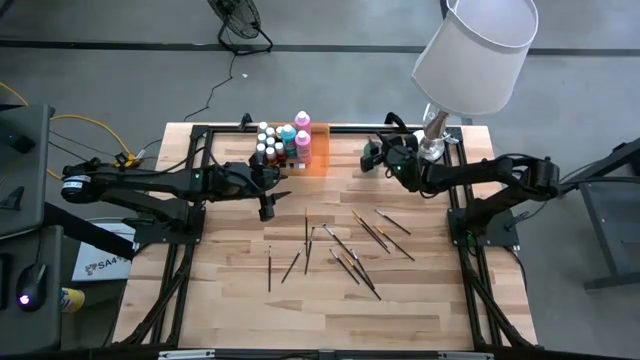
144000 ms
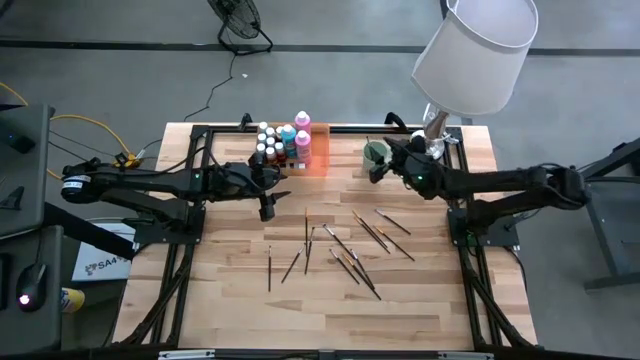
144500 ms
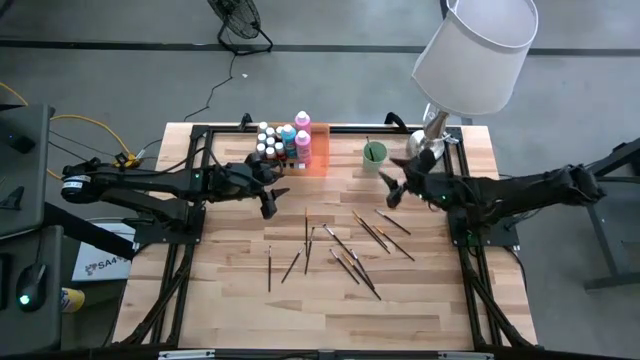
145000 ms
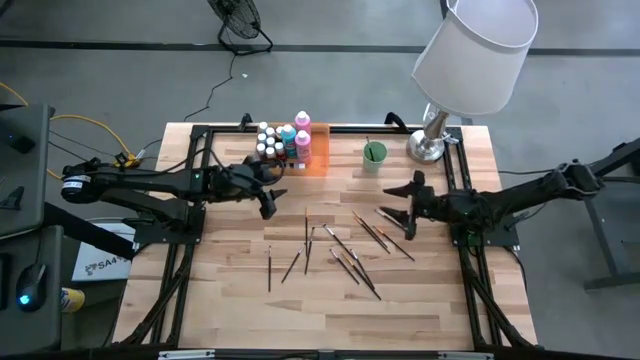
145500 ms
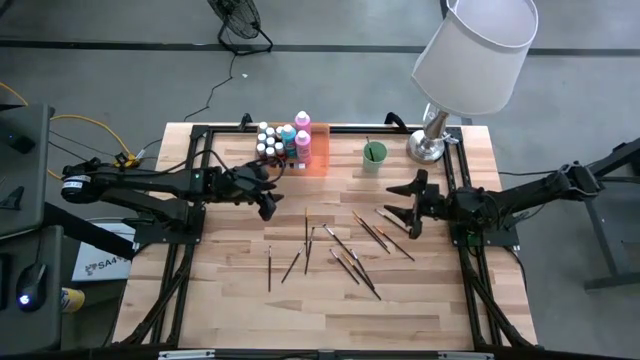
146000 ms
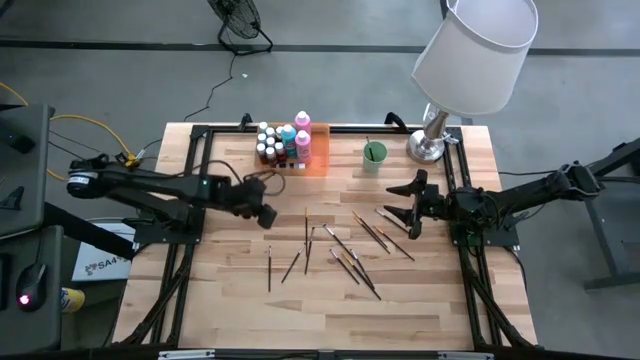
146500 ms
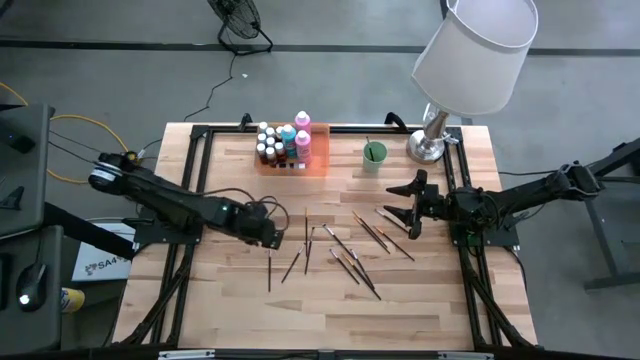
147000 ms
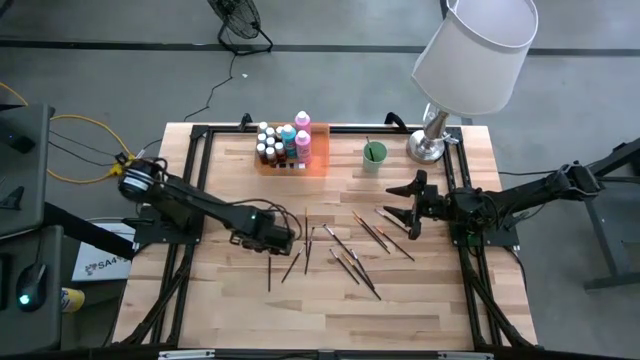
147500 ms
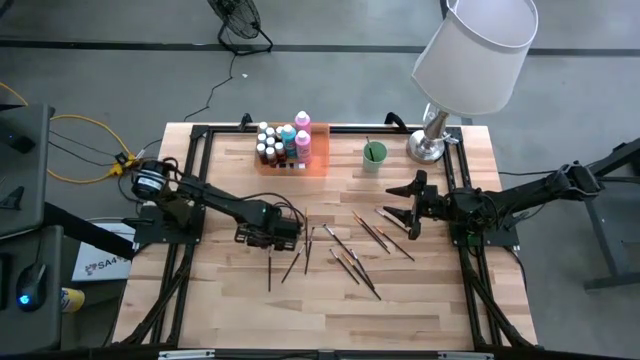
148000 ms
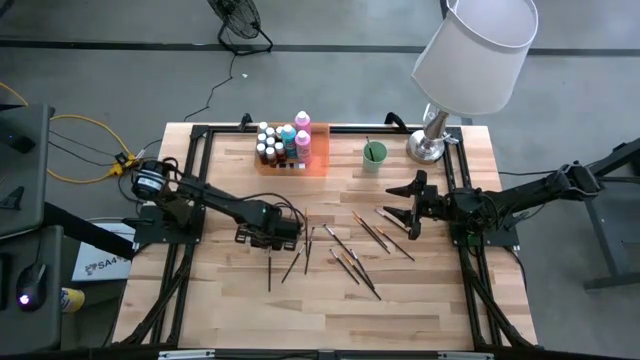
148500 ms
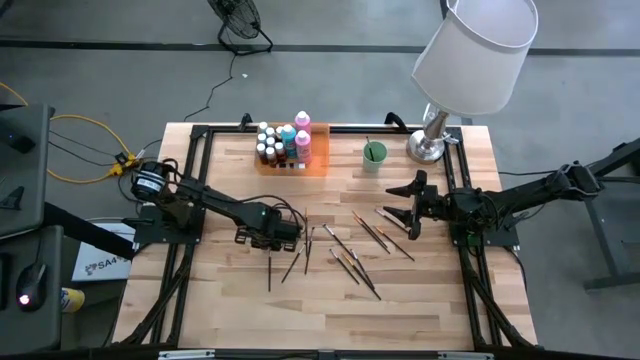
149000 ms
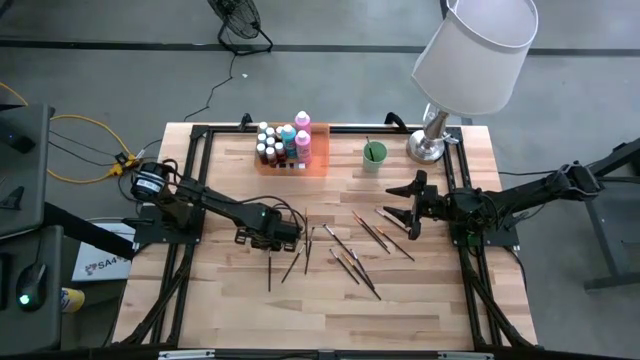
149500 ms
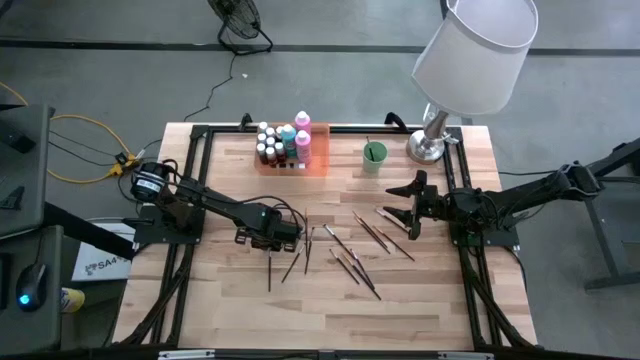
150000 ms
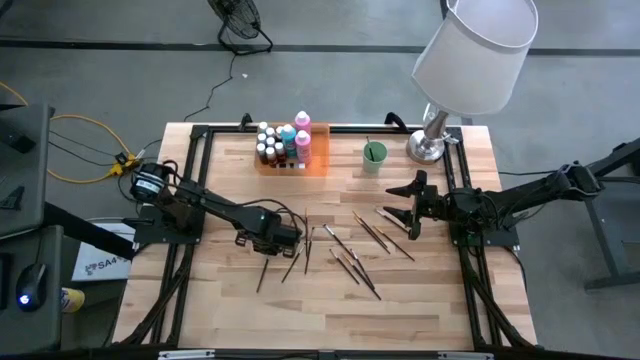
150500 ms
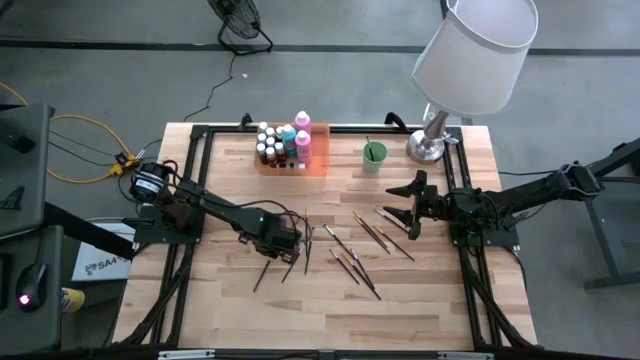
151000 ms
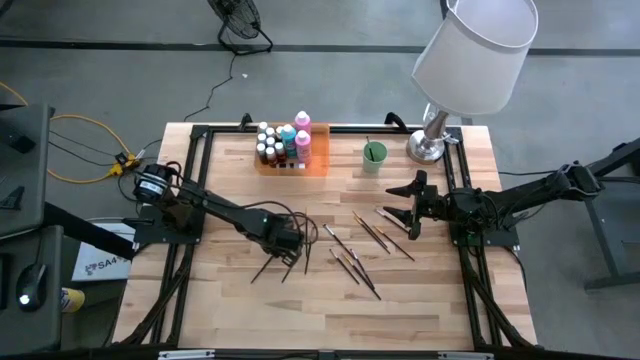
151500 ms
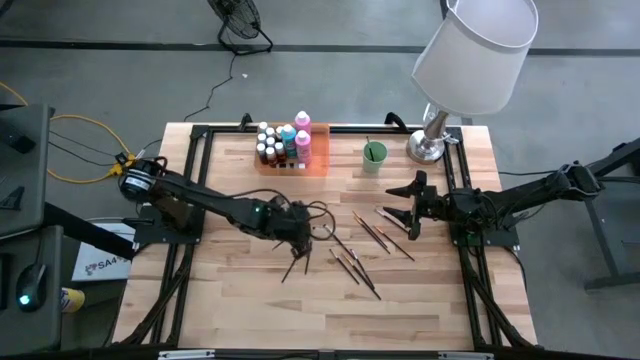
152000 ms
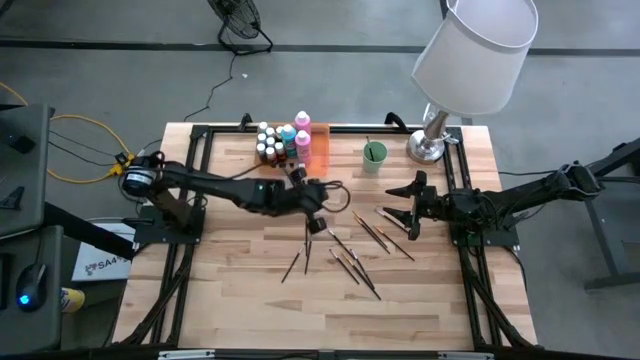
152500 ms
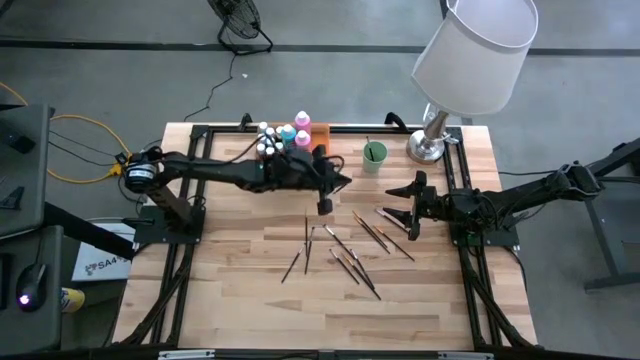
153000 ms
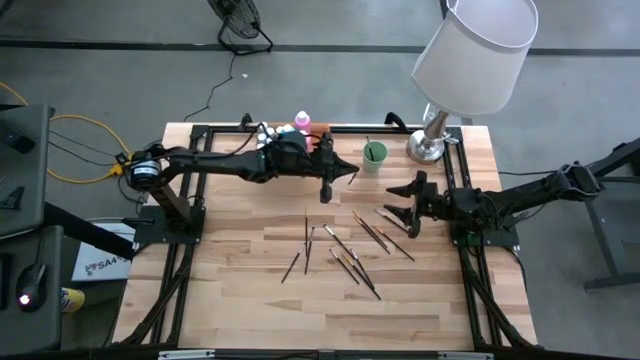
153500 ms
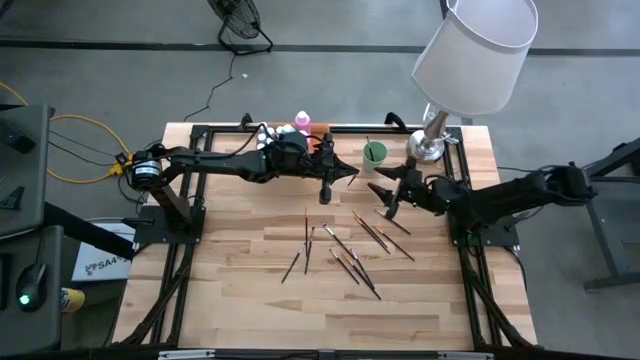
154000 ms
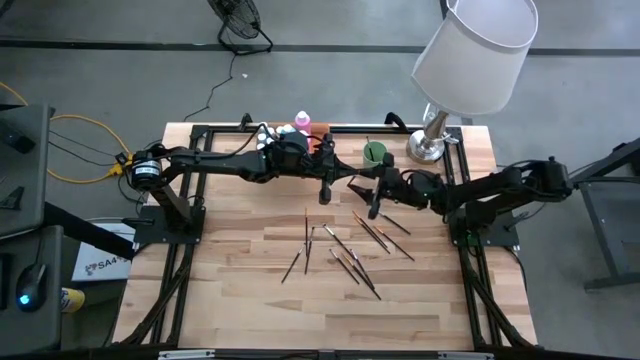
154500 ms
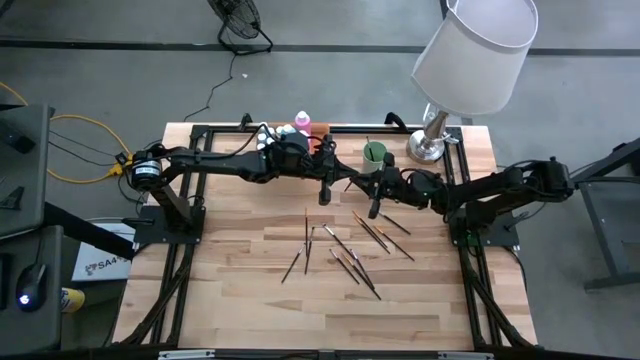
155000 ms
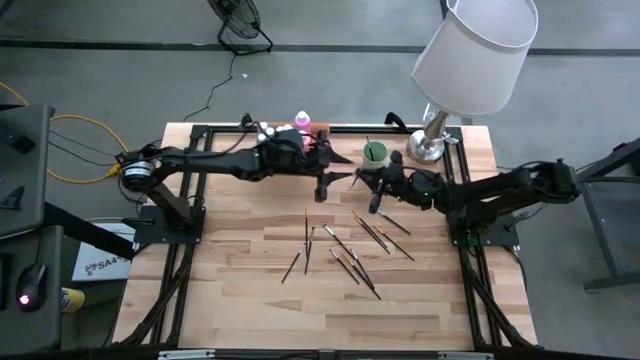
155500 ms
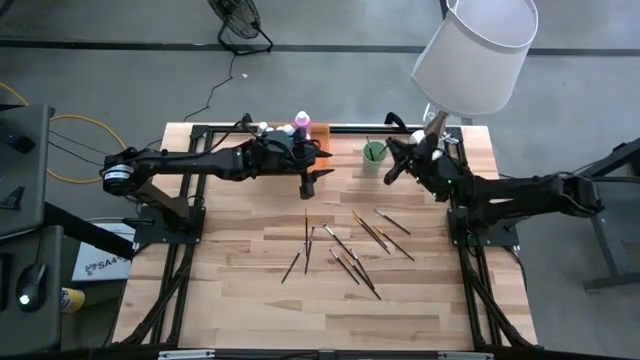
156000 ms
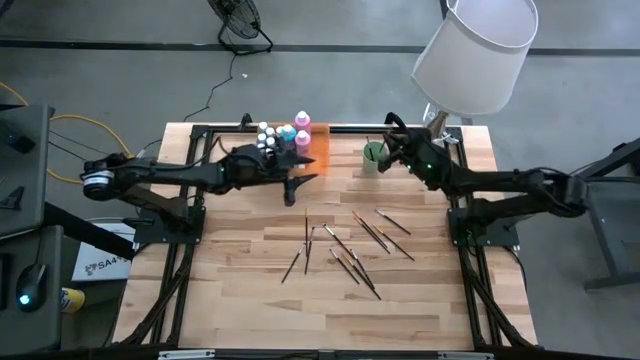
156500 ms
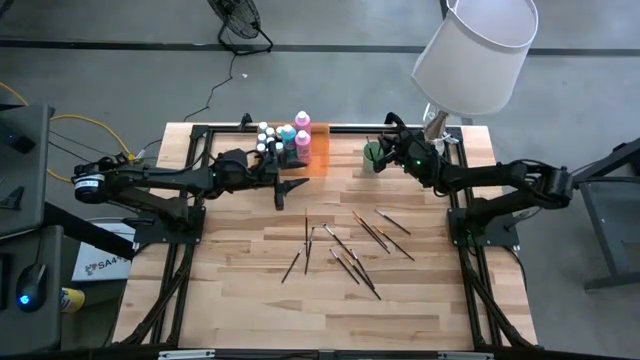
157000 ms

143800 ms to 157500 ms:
Task: Pick & Place Paint Supplies
Put the silver paint brush into the green cup

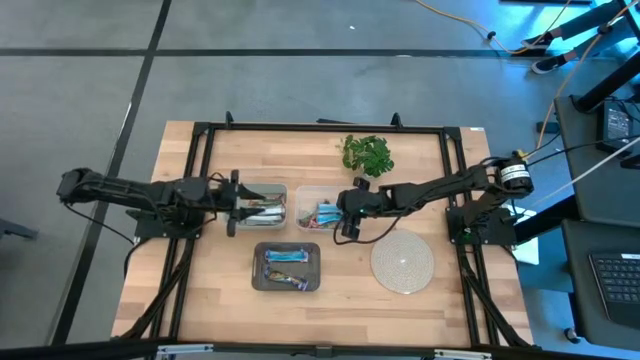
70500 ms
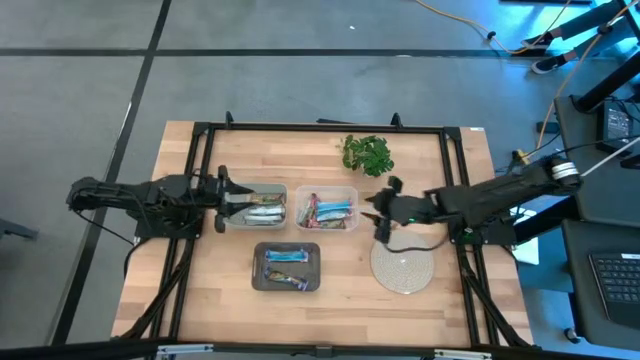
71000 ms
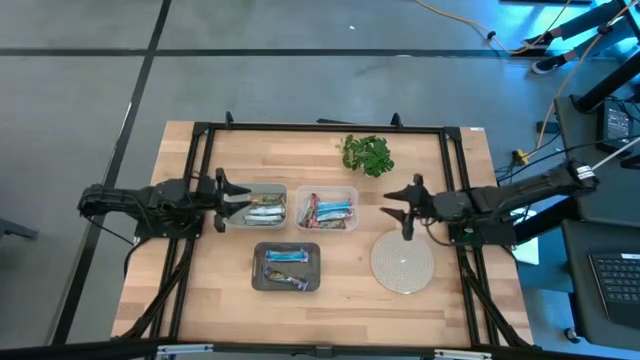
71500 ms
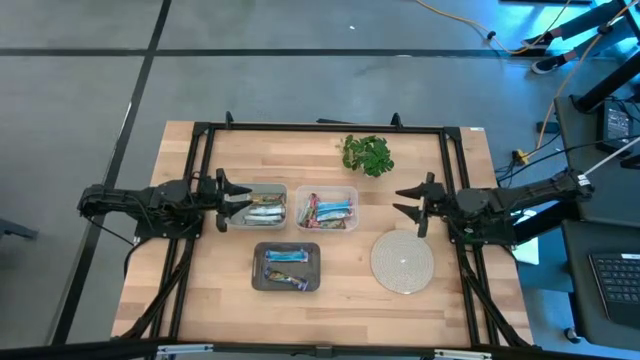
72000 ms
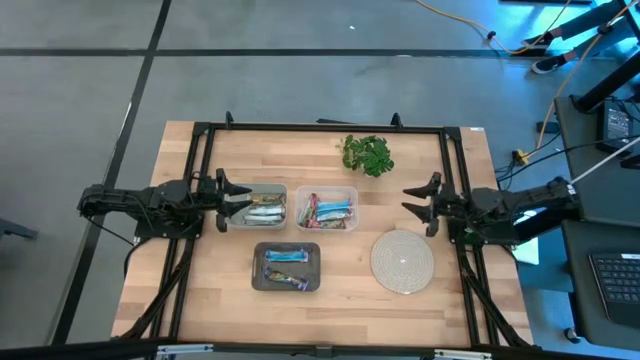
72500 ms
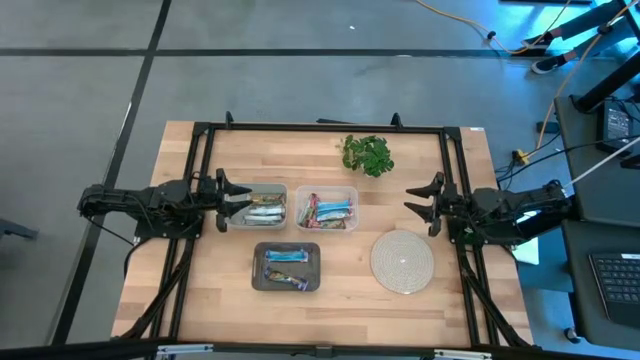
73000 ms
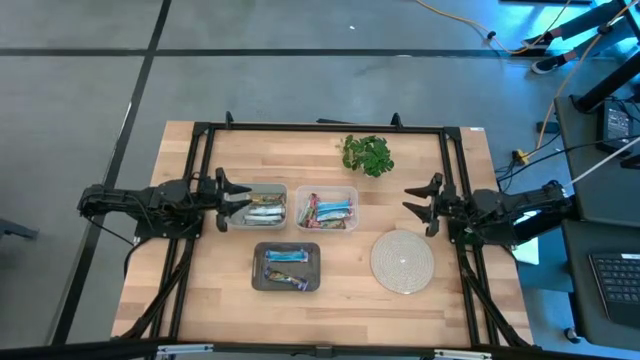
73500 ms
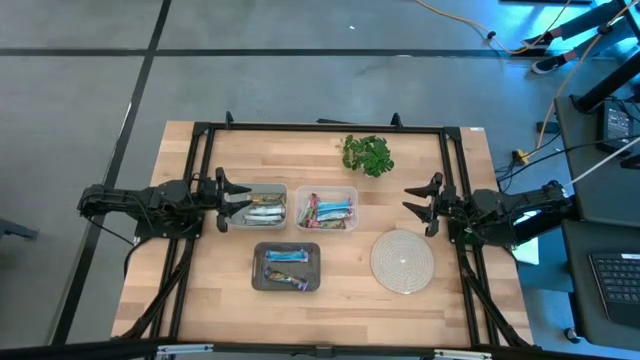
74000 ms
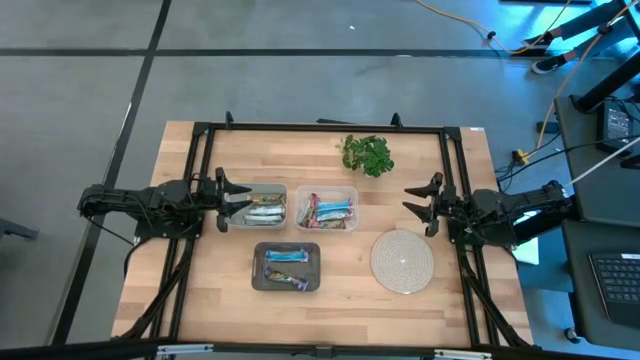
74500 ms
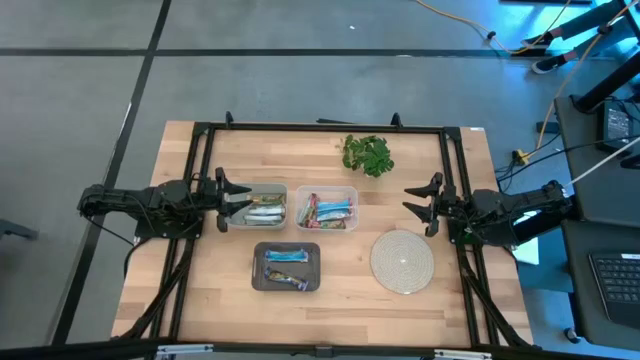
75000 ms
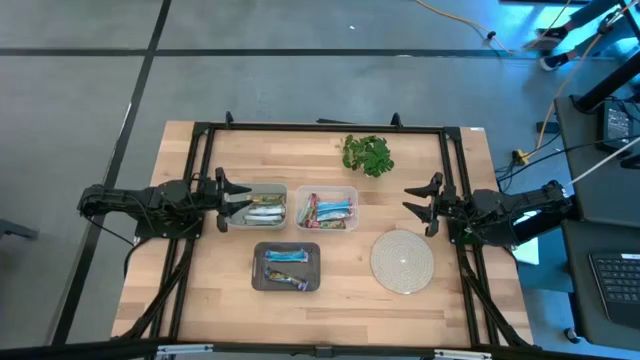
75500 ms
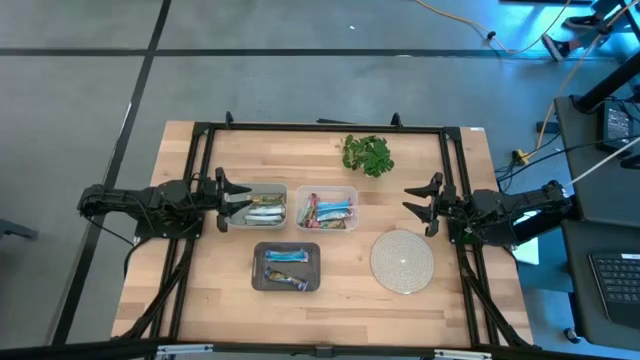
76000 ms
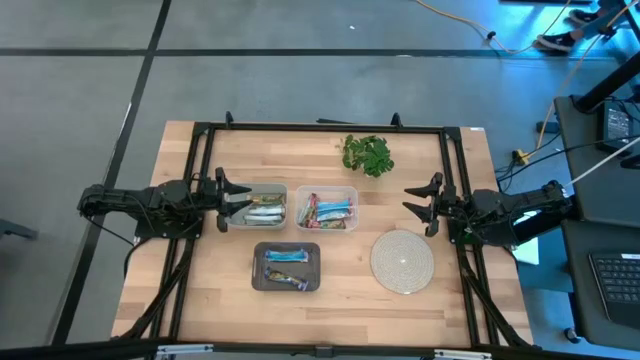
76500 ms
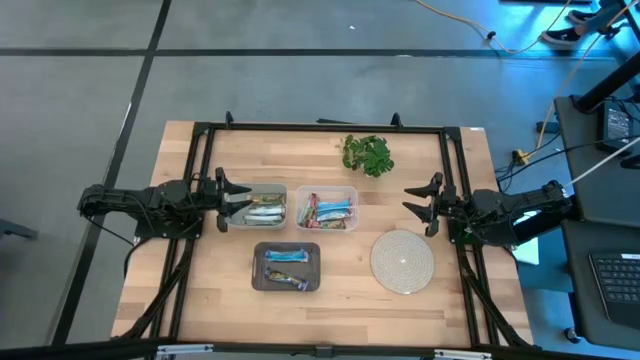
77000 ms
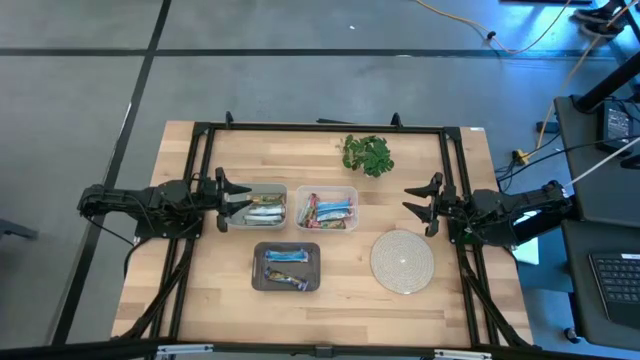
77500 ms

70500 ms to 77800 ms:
Task: Pick and place Granola Bars by type
Return to Home Position
